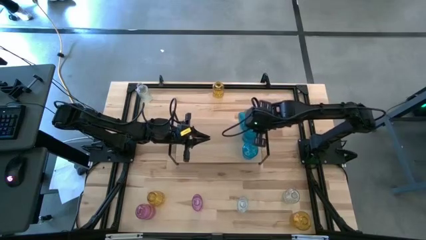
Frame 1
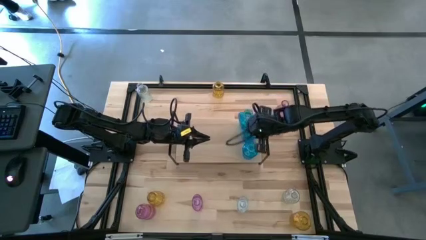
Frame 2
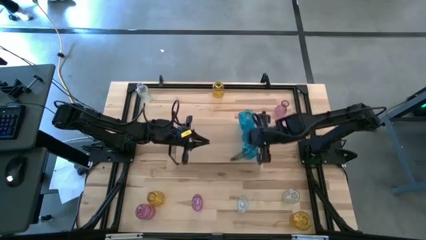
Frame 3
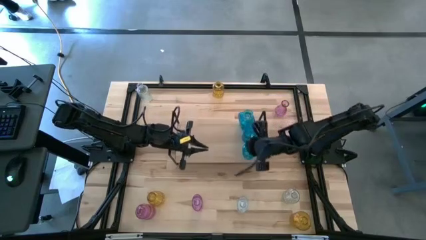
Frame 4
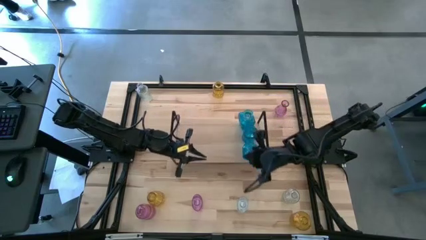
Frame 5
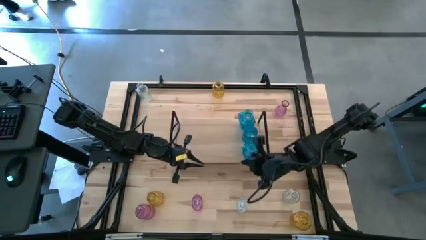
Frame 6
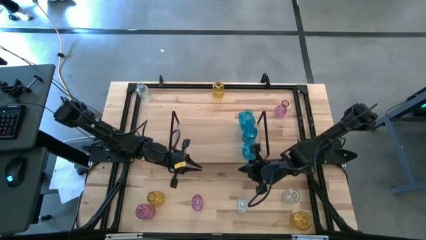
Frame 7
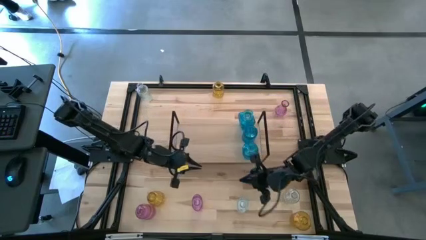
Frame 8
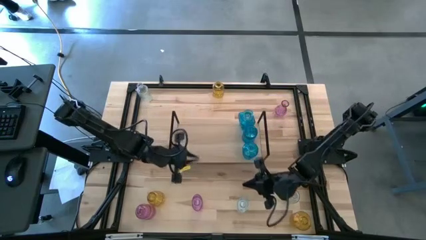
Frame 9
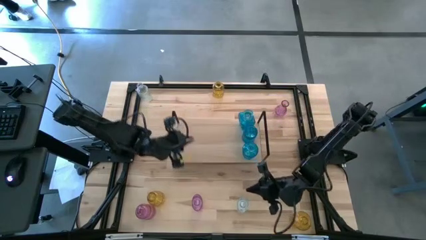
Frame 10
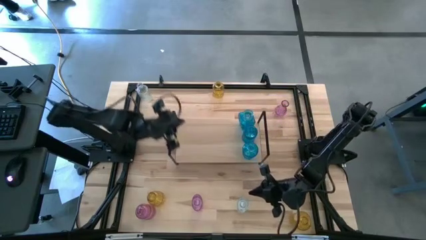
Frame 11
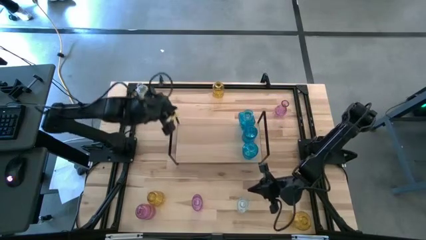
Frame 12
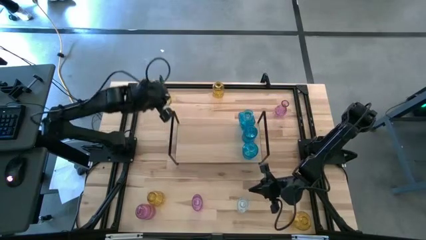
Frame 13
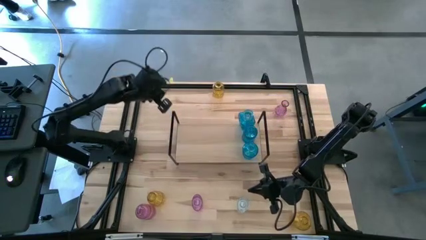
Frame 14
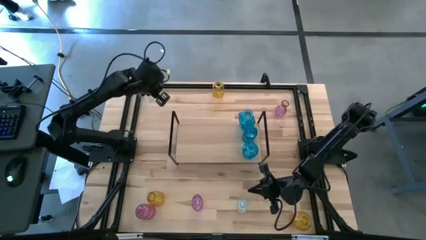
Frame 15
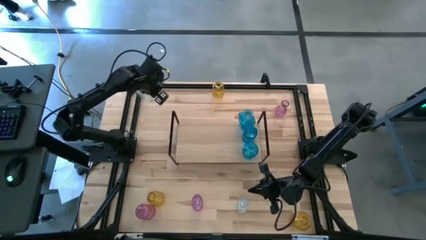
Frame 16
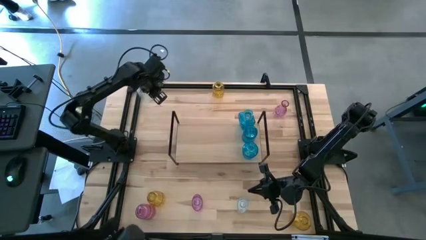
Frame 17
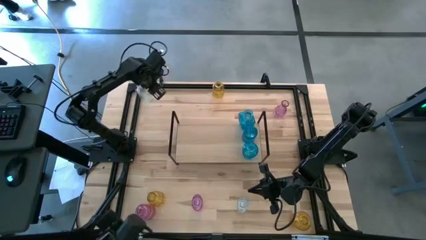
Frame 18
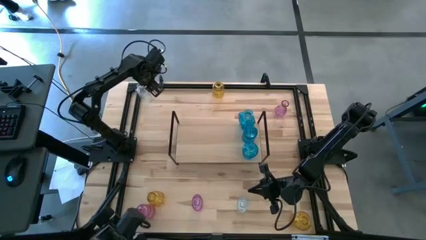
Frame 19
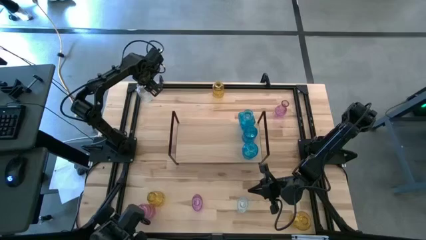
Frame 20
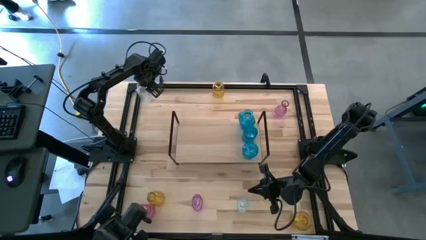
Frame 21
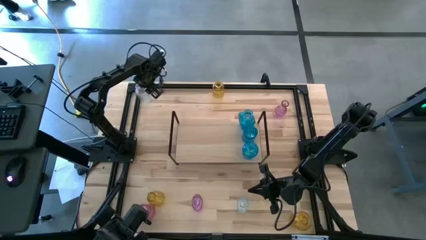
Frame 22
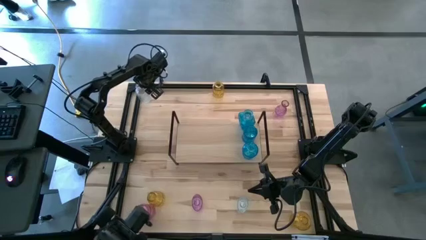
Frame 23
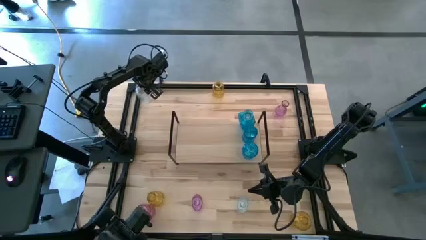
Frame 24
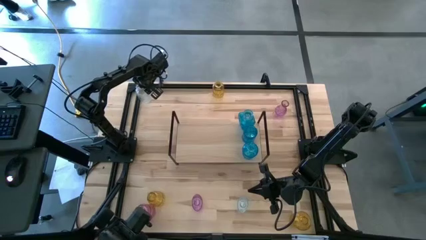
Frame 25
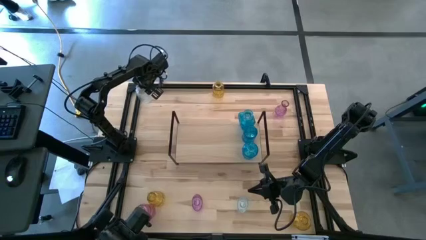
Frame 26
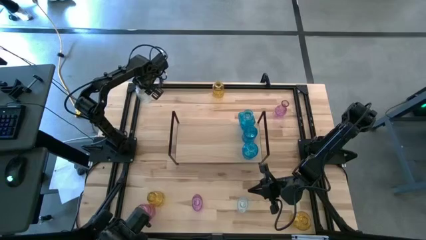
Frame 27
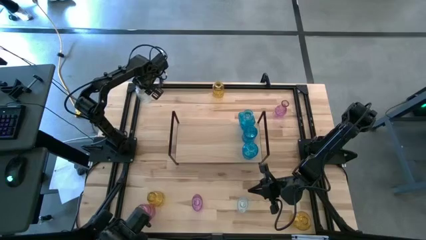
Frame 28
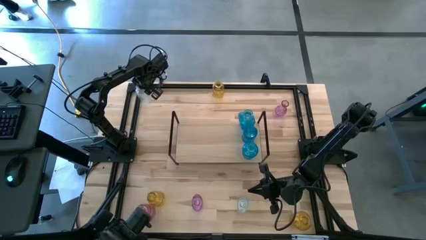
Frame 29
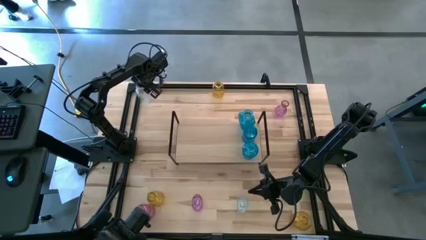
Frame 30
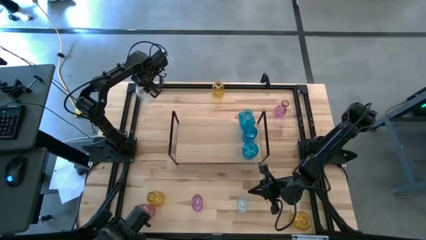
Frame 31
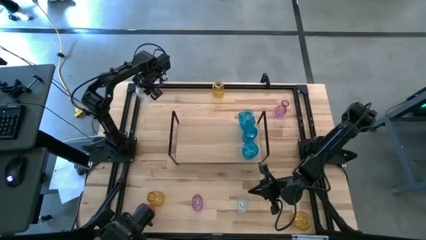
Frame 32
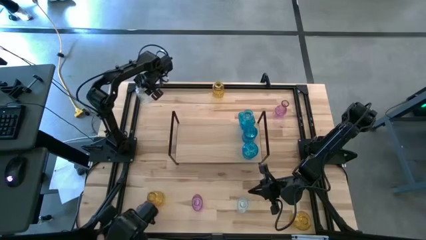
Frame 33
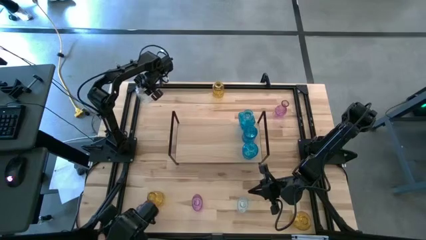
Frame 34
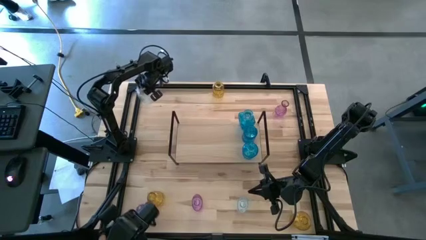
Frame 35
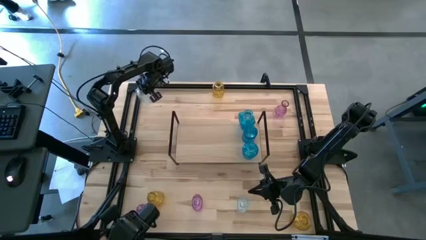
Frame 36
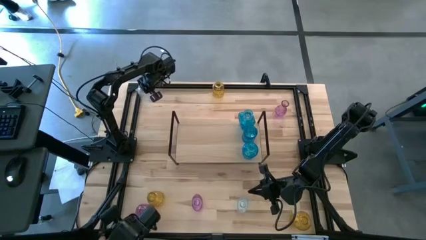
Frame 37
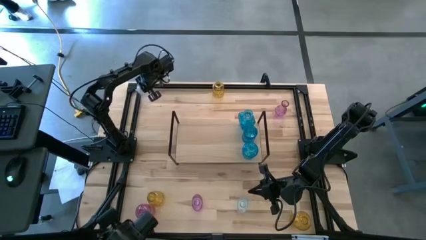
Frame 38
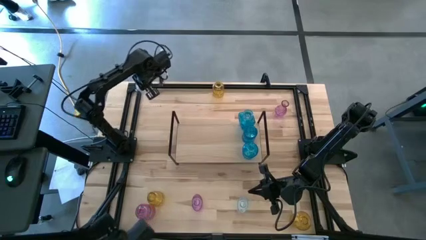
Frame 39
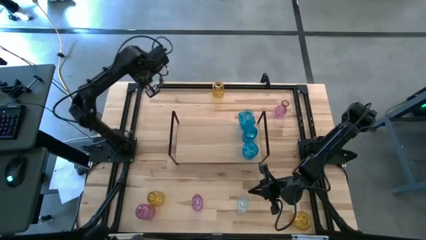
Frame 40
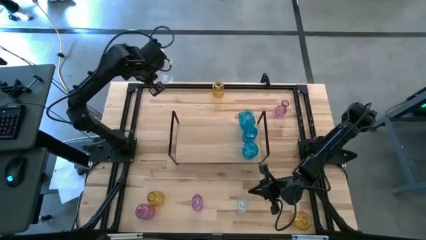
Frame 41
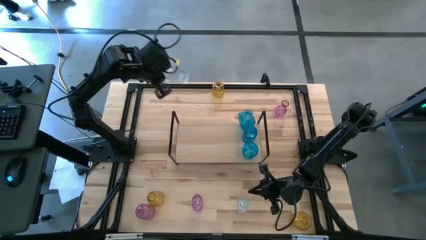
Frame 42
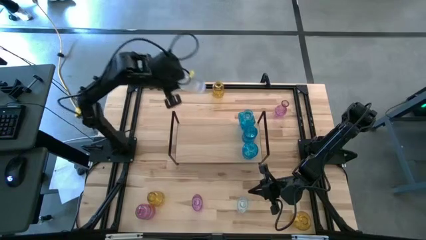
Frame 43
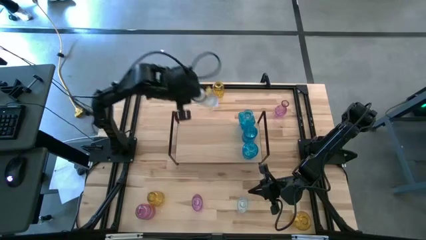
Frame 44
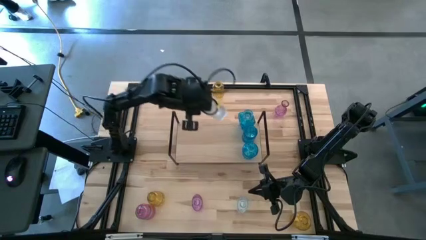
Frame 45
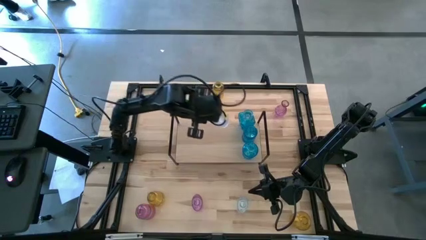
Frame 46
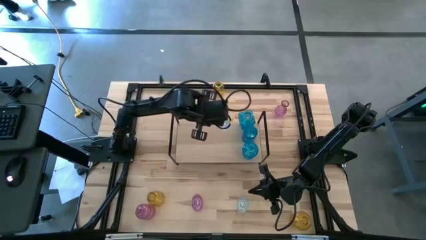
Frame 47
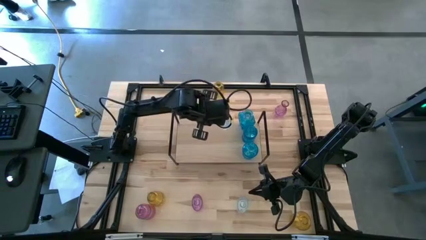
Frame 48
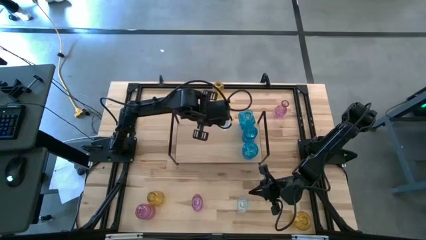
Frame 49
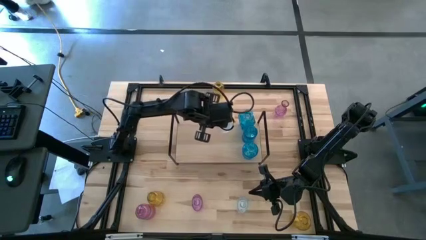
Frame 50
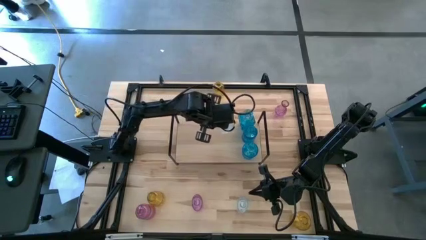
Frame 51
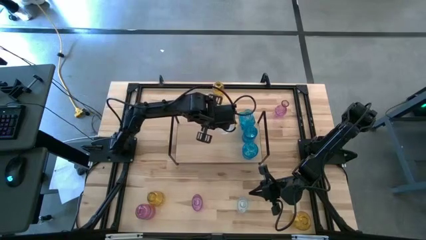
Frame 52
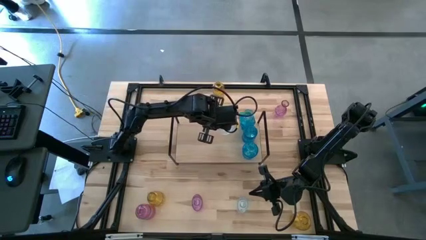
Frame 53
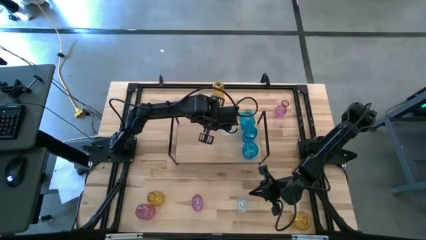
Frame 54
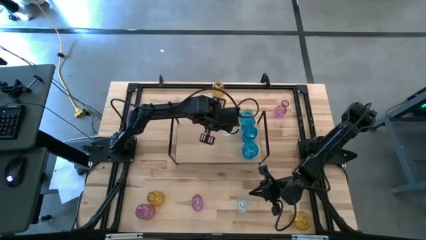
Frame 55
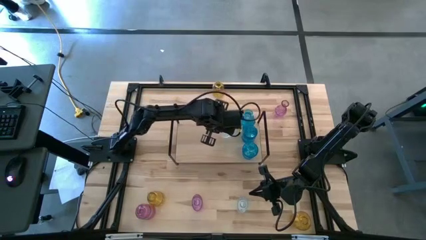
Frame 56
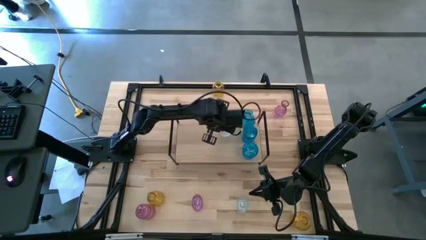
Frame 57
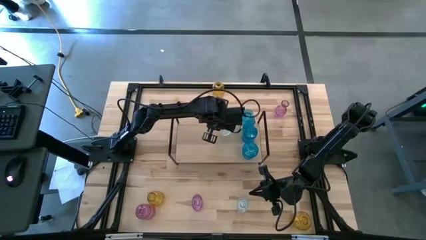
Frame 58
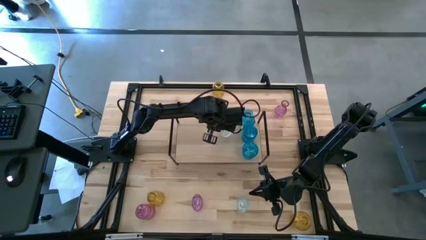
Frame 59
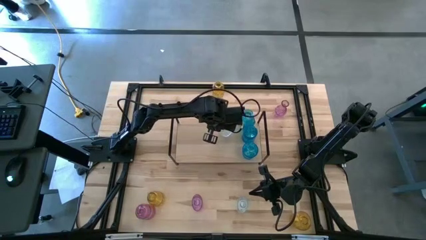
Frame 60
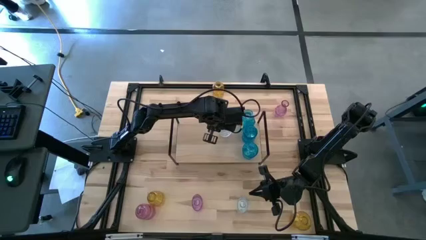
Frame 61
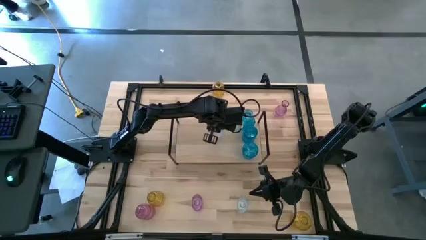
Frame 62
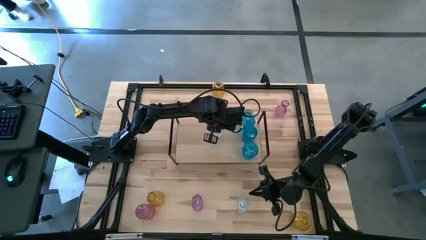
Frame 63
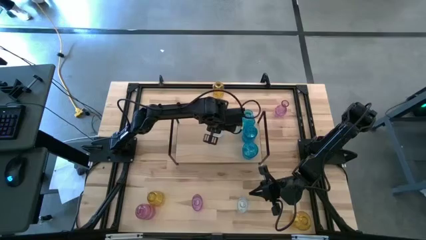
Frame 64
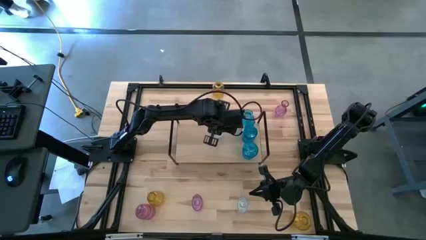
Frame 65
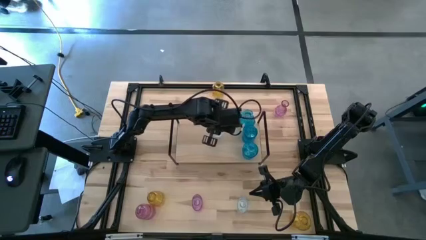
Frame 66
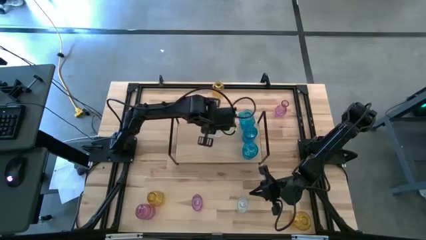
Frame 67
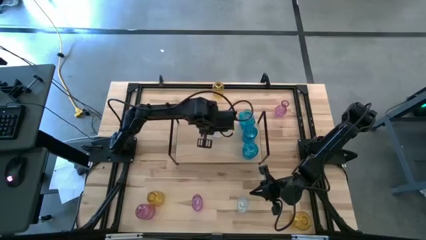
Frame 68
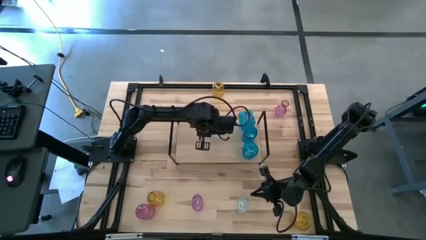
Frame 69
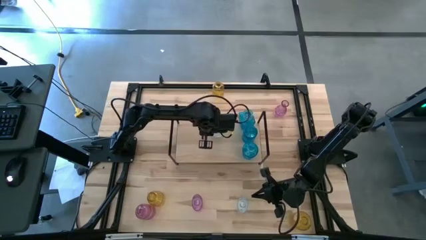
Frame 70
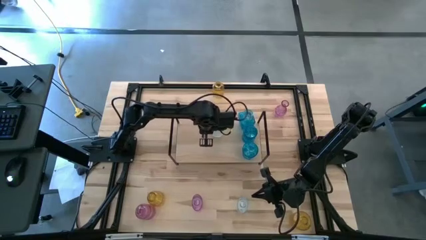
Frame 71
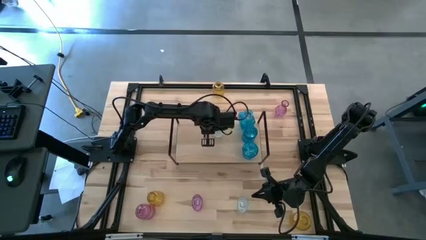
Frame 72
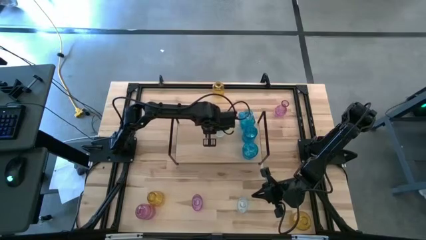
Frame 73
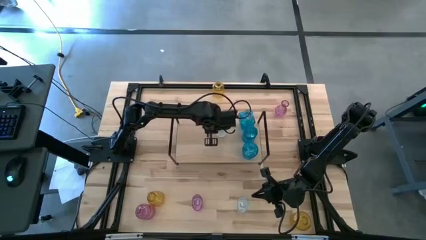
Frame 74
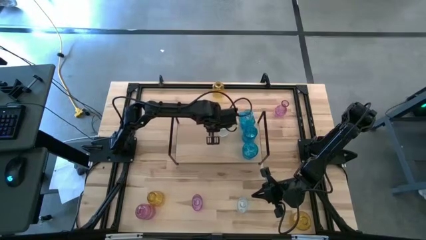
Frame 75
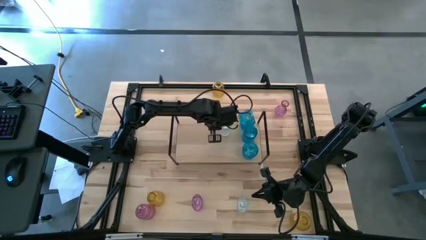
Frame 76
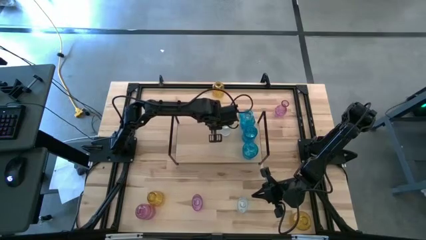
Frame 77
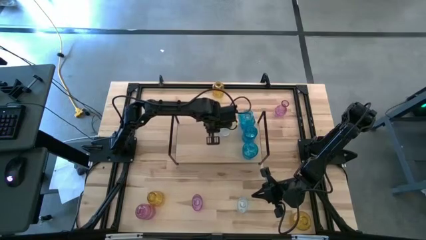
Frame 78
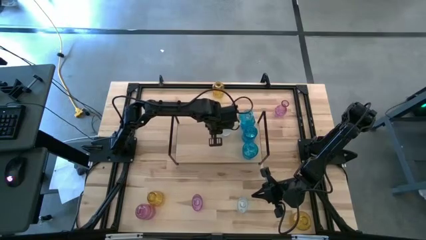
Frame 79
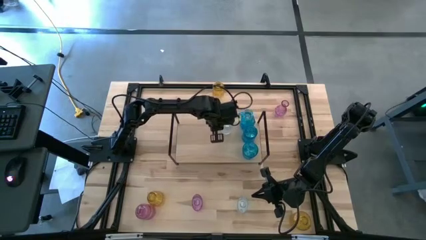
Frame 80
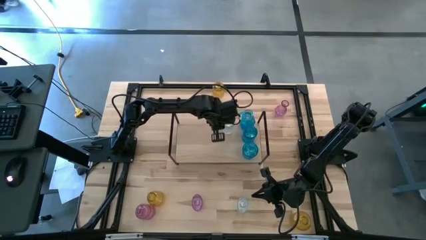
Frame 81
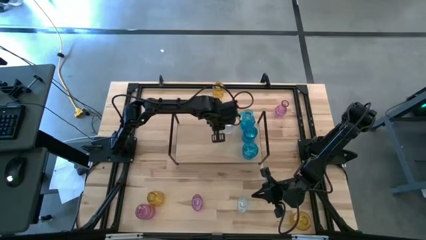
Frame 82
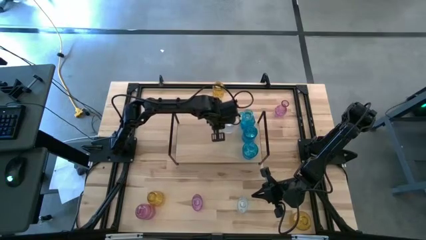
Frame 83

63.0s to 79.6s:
Task: sort vases onto shelf
Put the top transparent vase on the shelf
